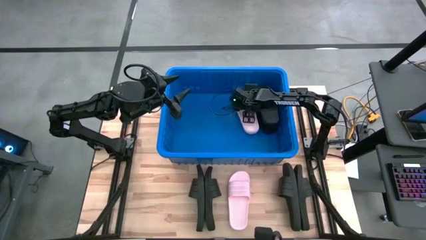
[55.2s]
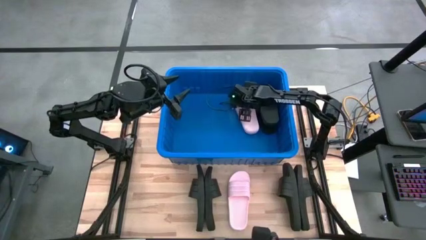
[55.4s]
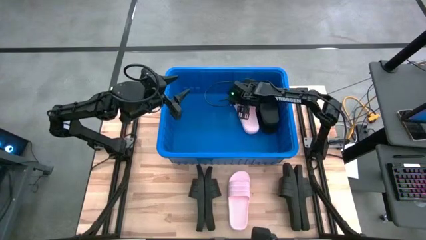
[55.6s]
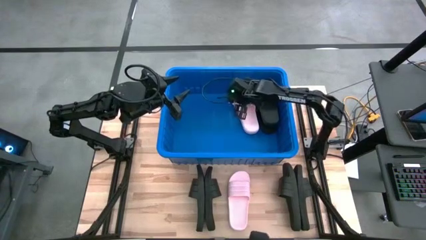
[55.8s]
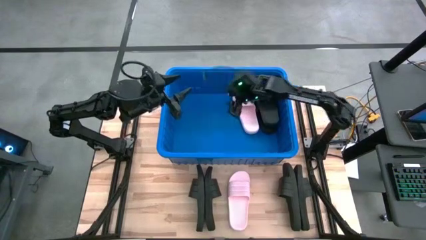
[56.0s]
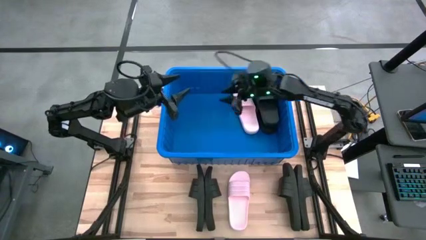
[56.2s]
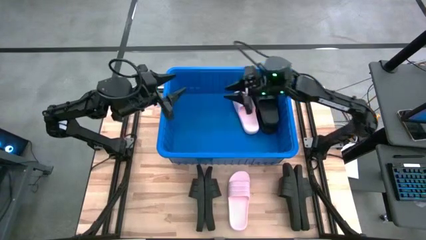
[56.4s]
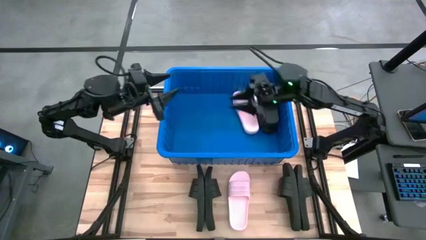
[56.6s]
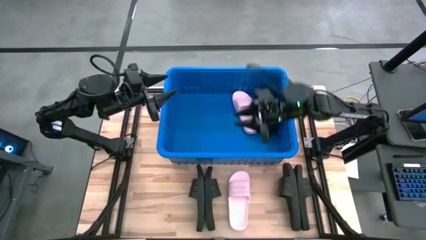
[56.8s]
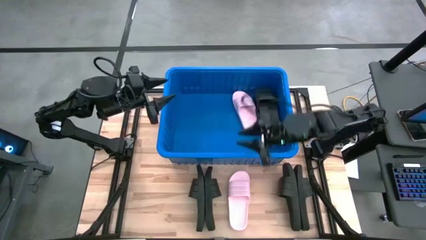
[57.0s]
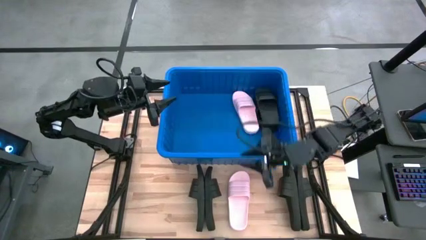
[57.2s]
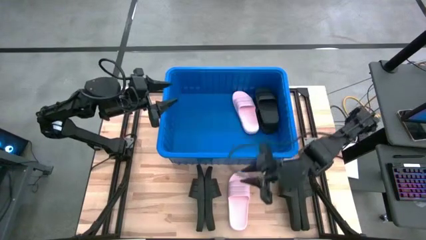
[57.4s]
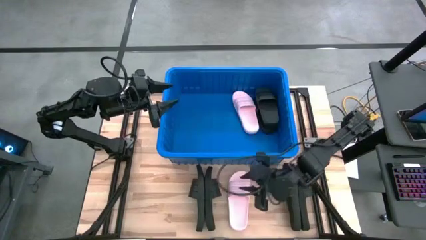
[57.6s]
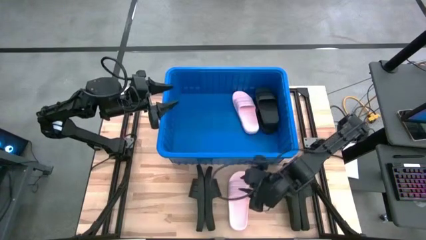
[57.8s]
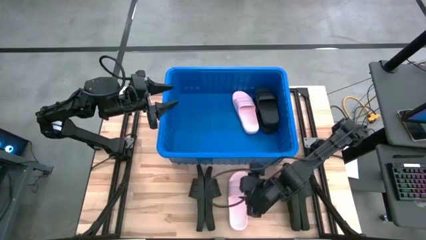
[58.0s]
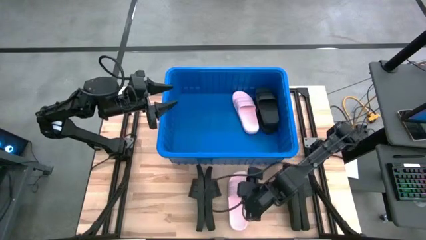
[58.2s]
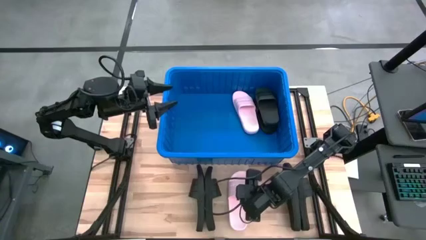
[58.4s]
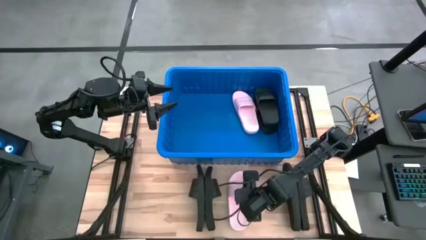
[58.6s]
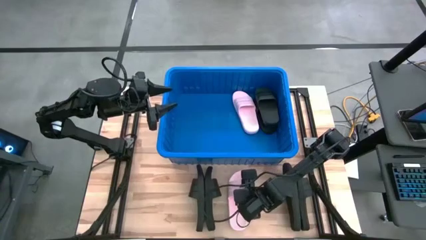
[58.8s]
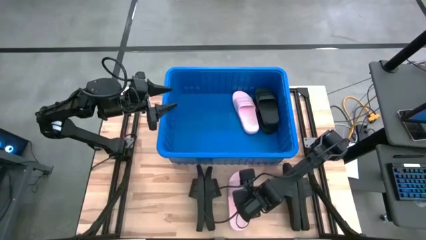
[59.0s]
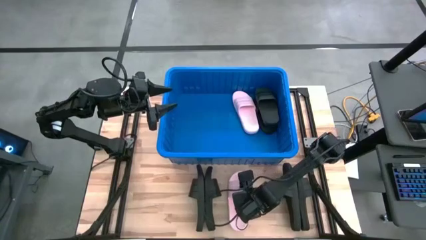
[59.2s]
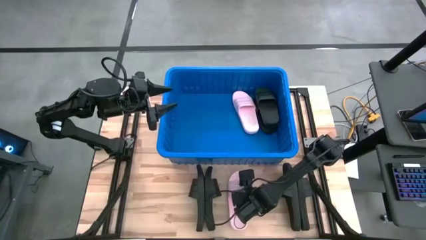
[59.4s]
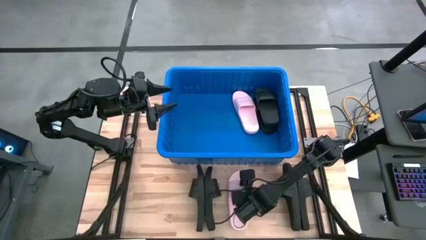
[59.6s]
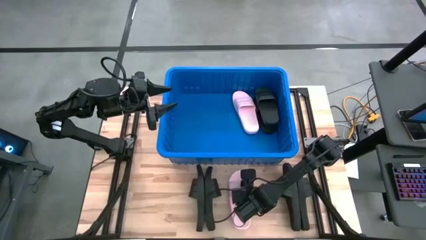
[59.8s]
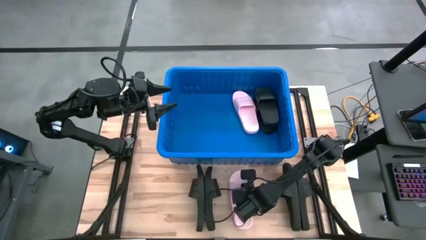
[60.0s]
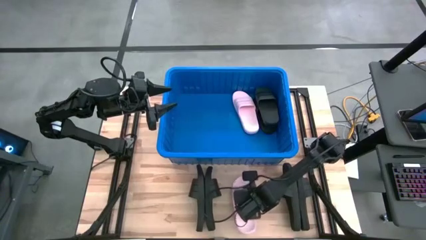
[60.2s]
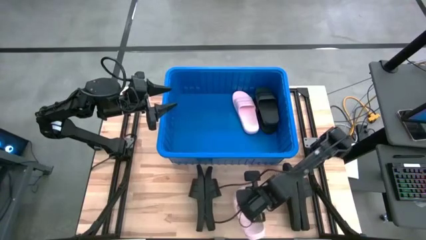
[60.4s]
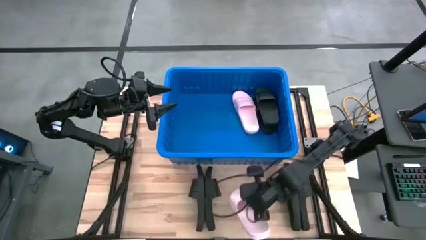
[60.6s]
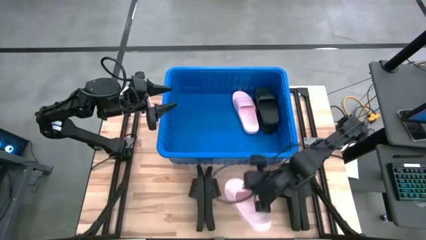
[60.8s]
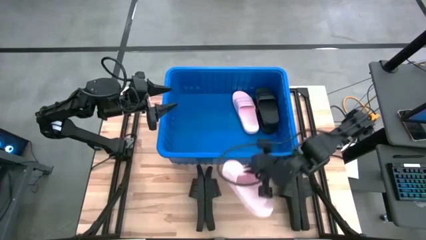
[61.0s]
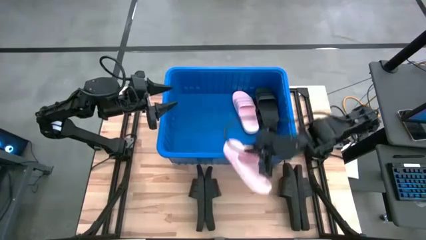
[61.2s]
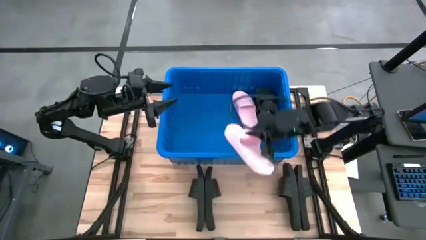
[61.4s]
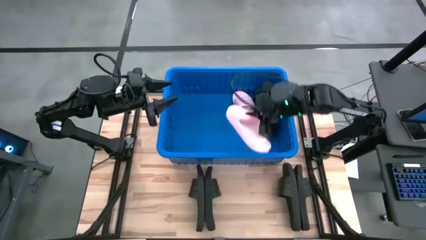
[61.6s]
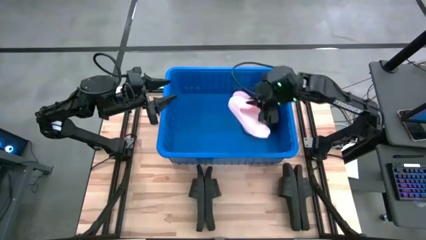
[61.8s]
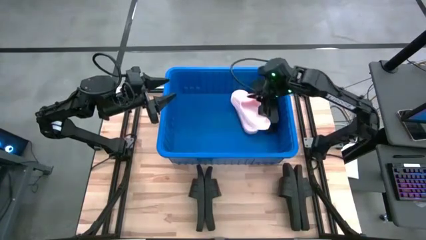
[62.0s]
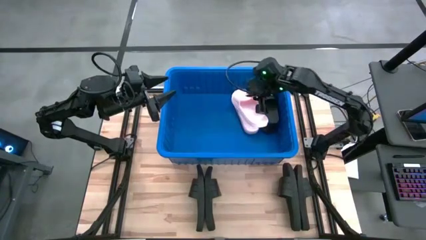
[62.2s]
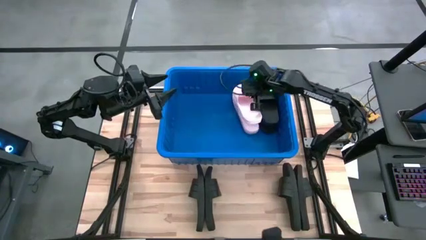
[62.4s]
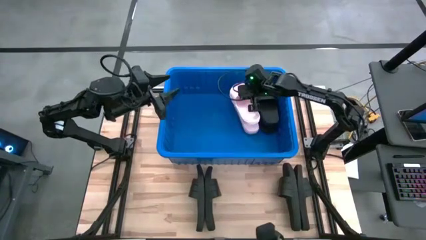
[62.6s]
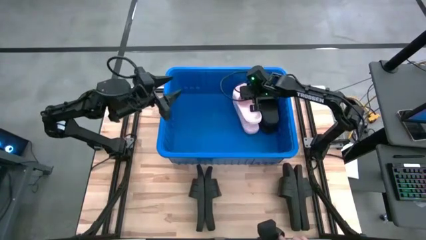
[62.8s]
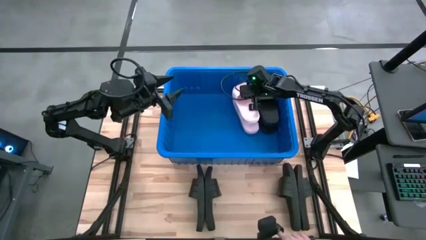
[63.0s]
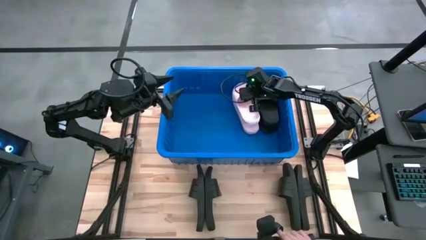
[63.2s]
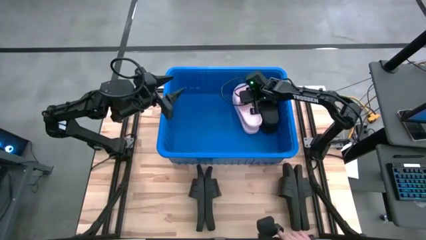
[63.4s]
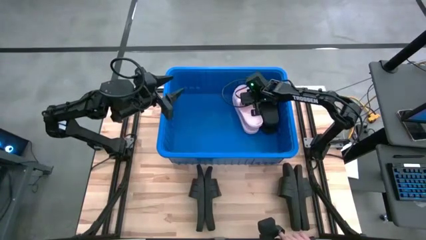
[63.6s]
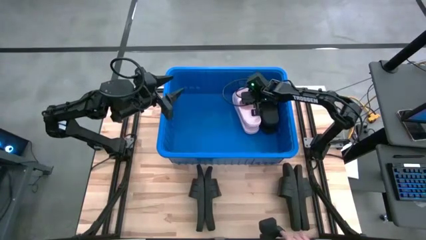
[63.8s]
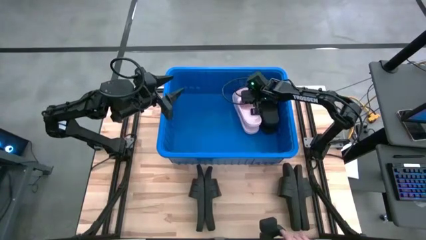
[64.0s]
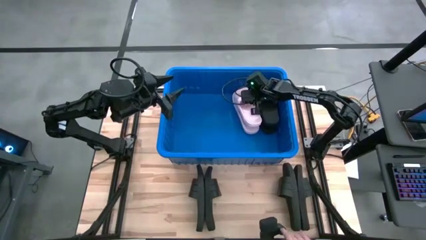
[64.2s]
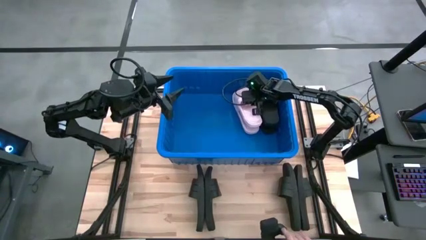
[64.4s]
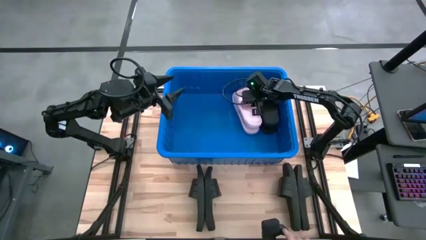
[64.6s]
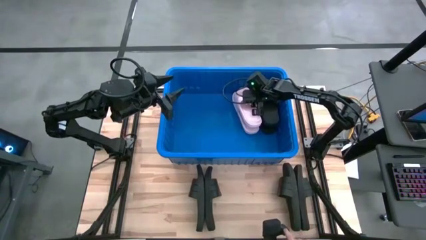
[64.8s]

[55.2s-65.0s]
Task: Pick and place slides into bin
Put the pink slide into the blue bin
